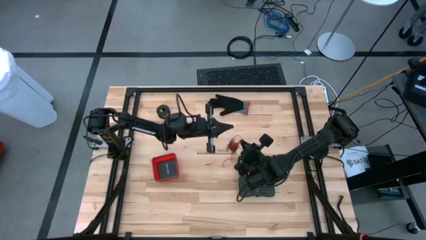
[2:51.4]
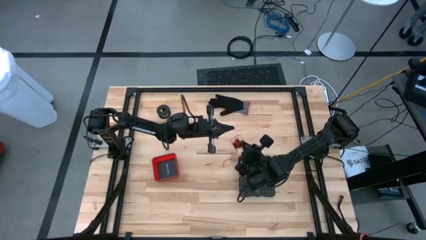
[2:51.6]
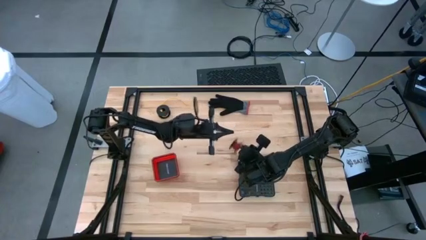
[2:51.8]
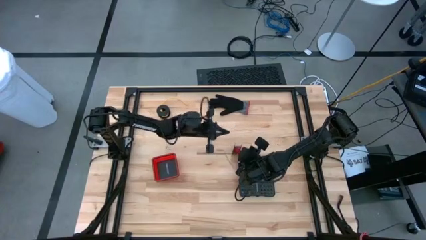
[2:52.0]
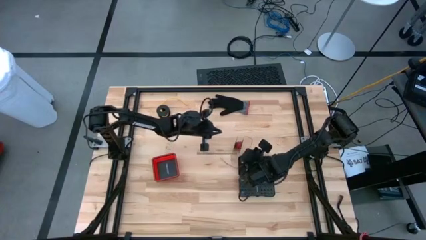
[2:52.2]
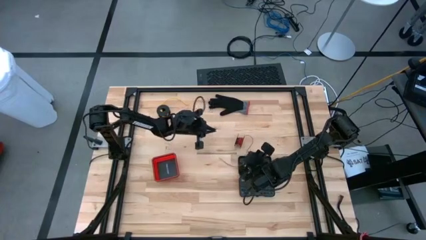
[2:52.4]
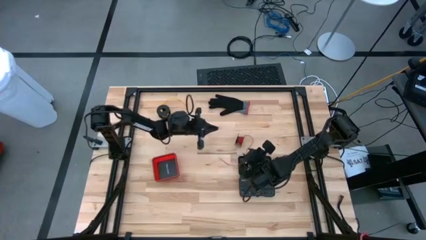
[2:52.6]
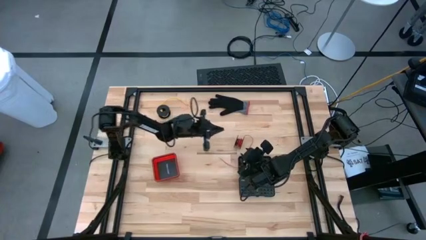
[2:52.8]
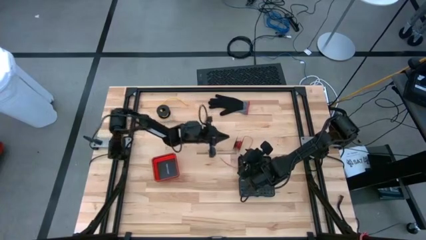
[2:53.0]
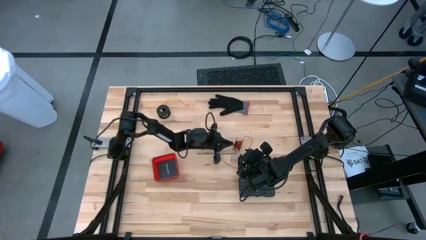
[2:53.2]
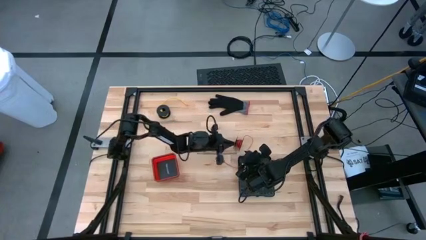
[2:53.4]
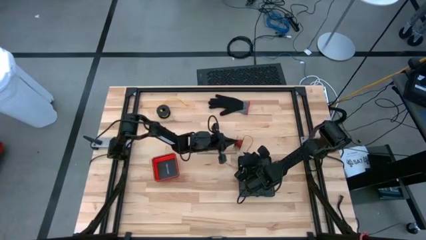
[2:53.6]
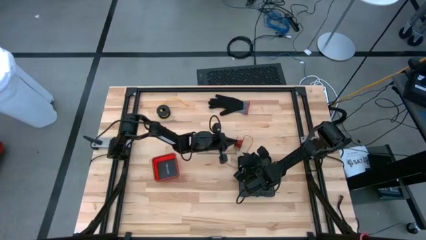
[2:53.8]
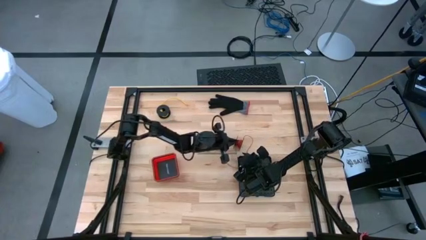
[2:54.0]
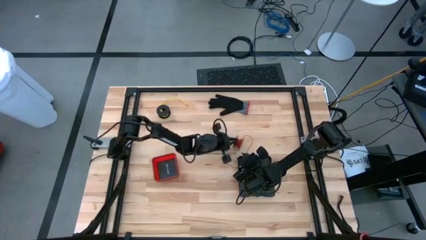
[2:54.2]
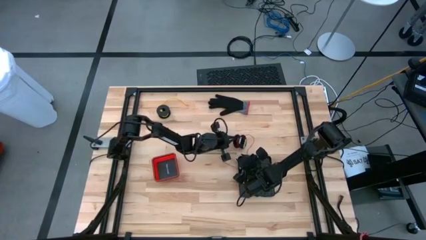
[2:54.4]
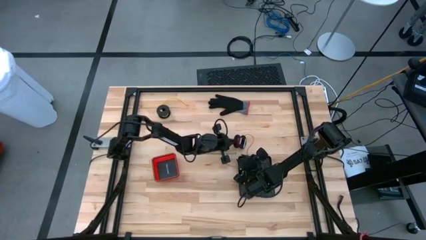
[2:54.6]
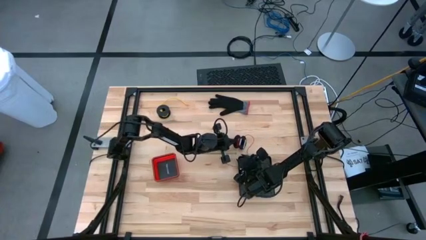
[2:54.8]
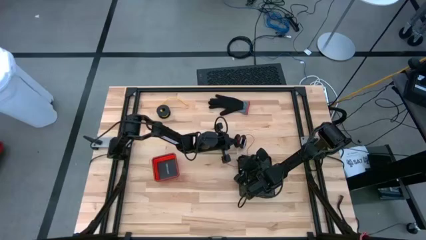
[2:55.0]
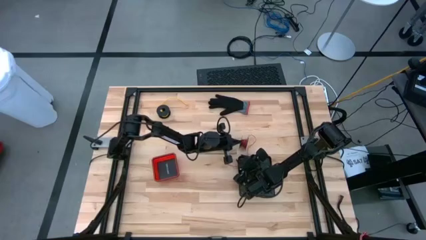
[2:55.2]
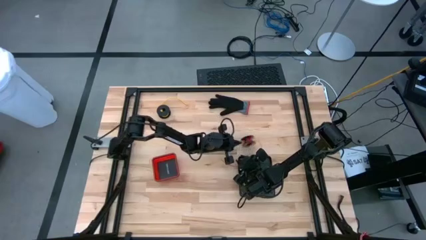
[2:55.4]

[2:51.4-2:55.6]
Task: Coil cords
Coil the red wire onto the spool

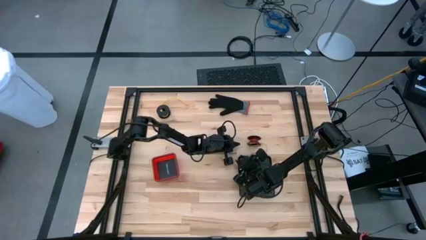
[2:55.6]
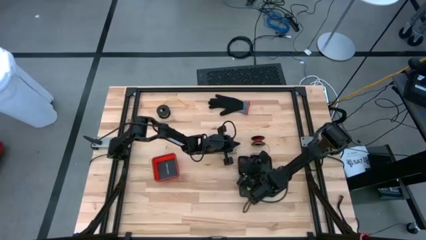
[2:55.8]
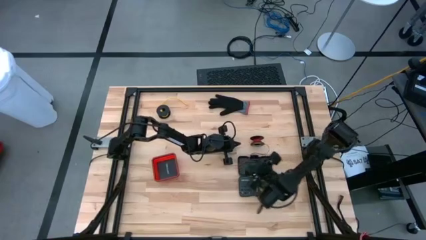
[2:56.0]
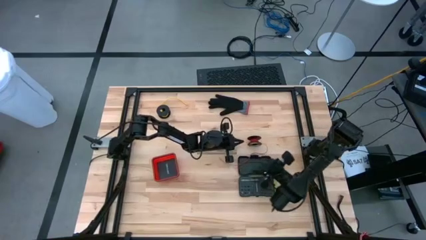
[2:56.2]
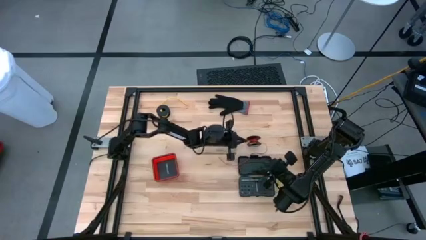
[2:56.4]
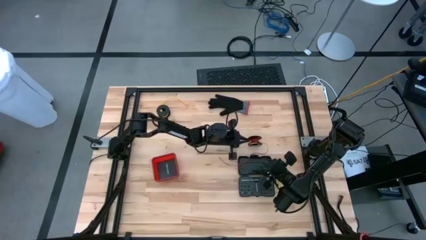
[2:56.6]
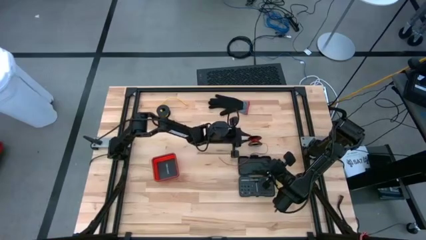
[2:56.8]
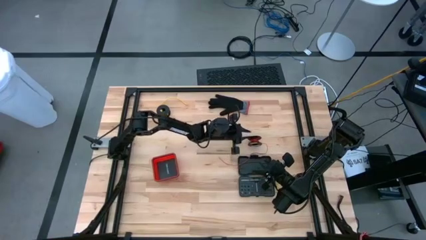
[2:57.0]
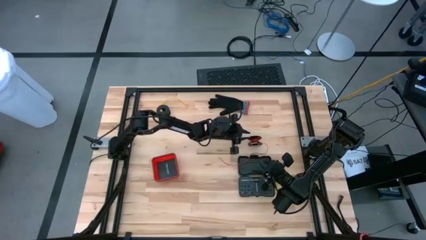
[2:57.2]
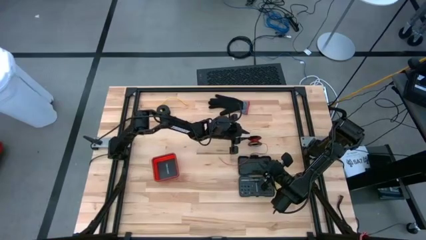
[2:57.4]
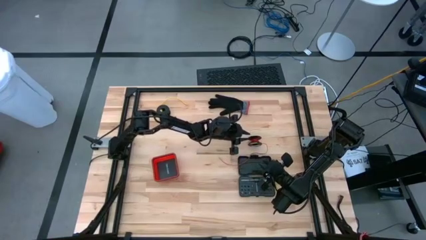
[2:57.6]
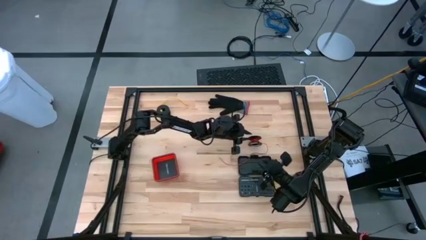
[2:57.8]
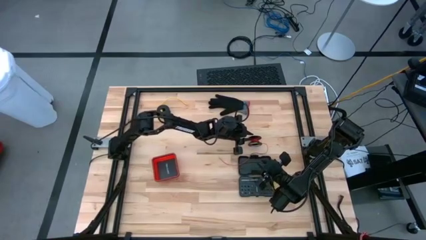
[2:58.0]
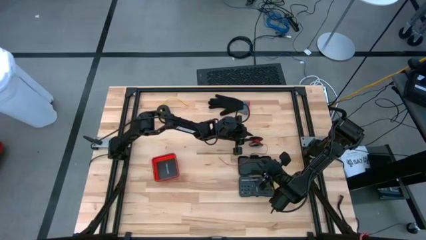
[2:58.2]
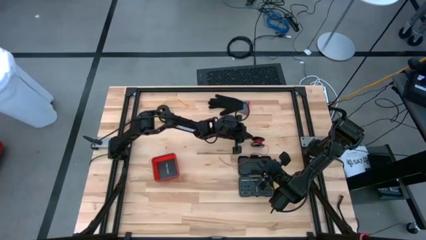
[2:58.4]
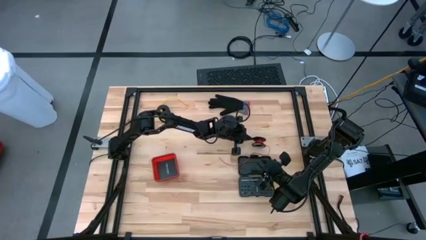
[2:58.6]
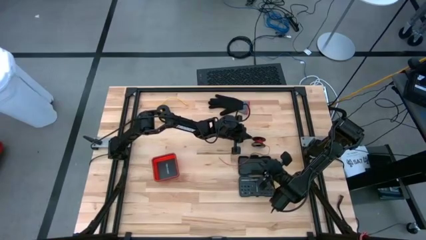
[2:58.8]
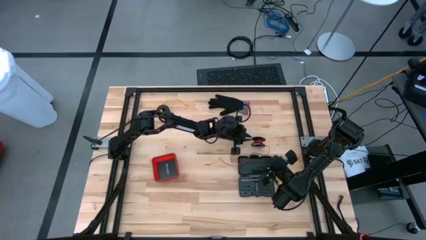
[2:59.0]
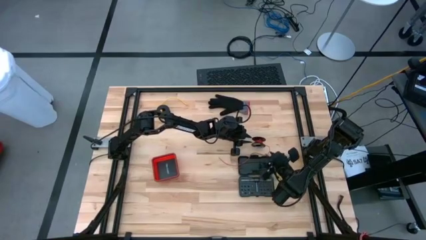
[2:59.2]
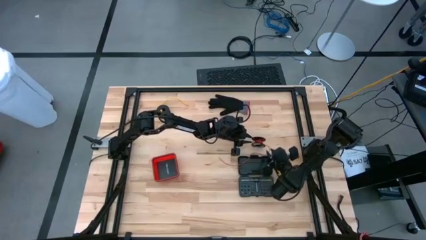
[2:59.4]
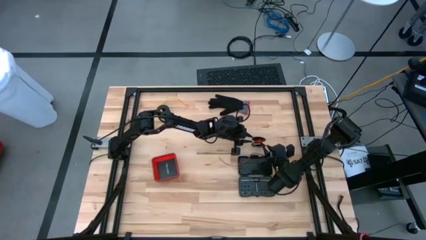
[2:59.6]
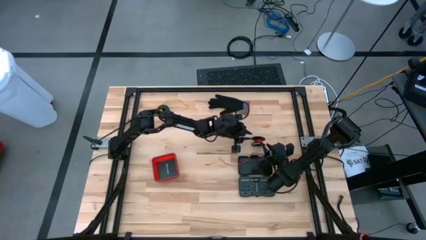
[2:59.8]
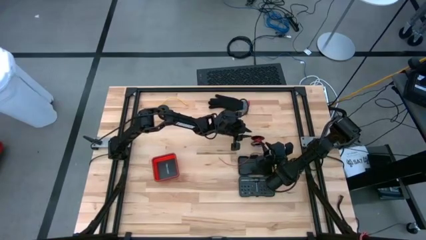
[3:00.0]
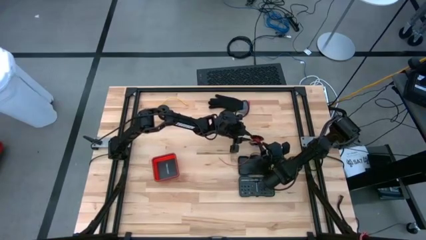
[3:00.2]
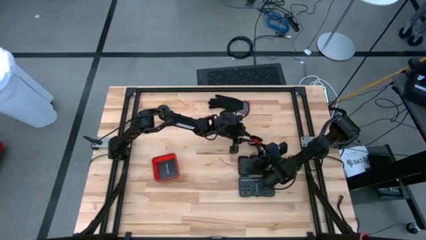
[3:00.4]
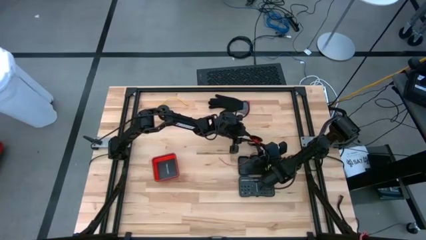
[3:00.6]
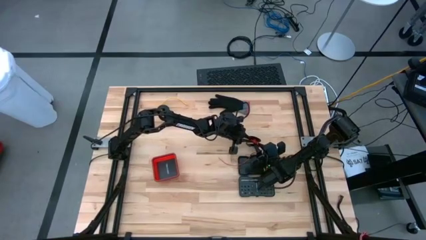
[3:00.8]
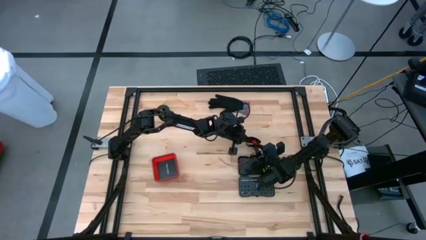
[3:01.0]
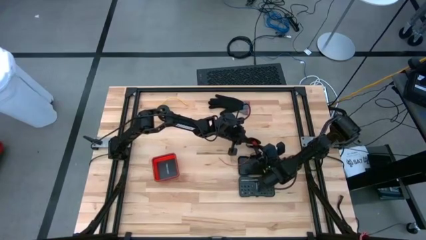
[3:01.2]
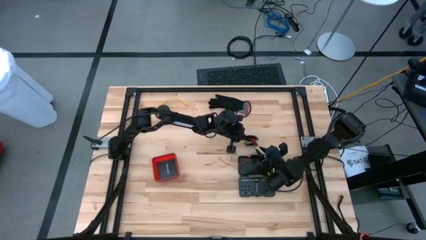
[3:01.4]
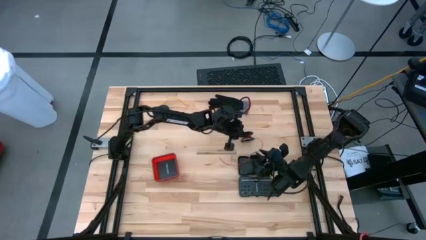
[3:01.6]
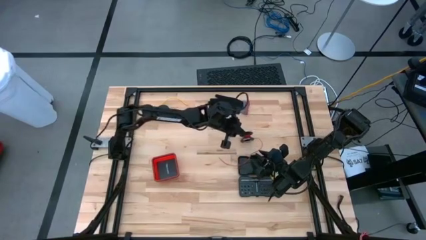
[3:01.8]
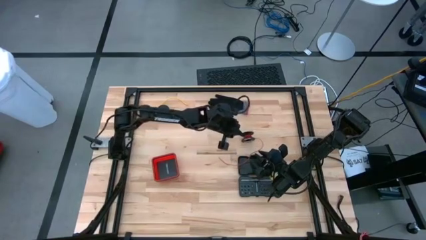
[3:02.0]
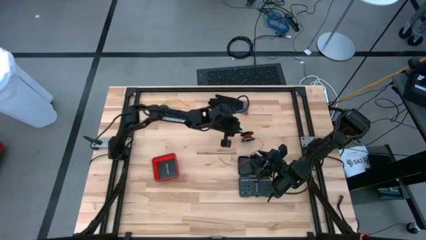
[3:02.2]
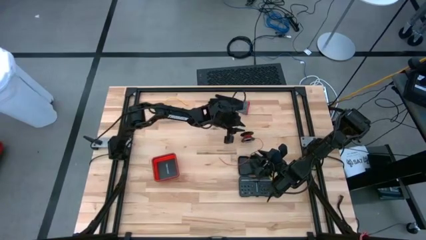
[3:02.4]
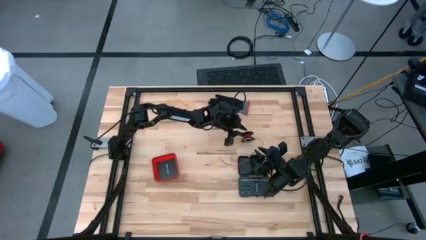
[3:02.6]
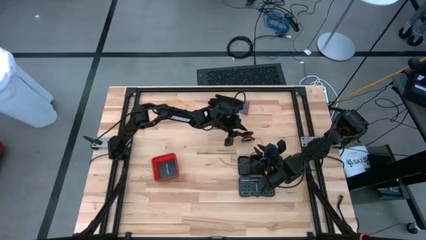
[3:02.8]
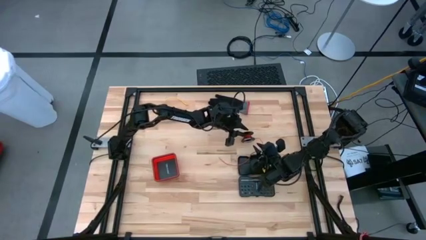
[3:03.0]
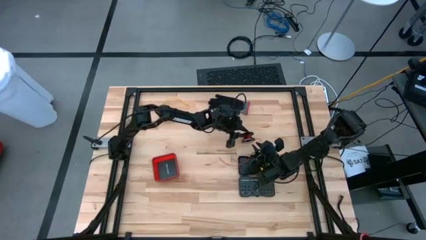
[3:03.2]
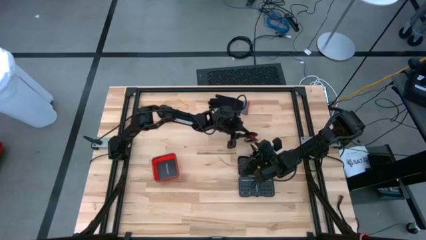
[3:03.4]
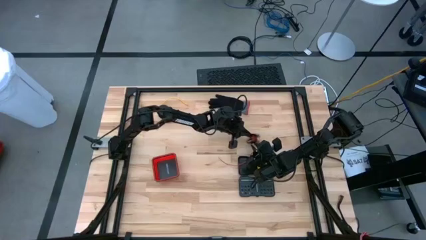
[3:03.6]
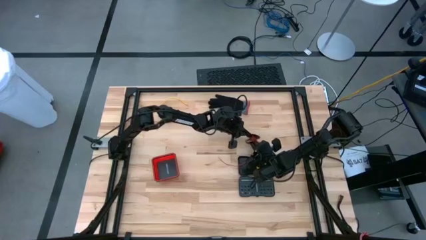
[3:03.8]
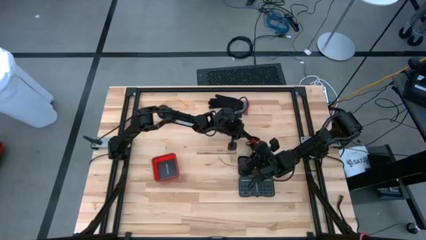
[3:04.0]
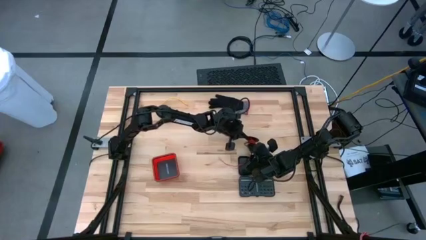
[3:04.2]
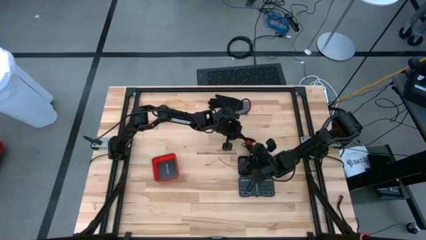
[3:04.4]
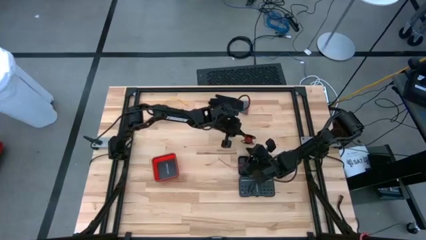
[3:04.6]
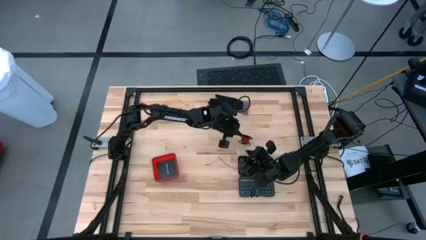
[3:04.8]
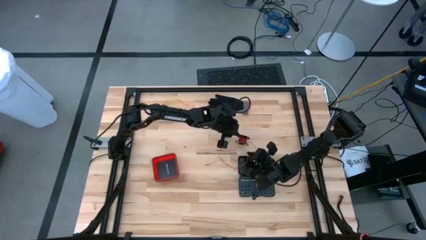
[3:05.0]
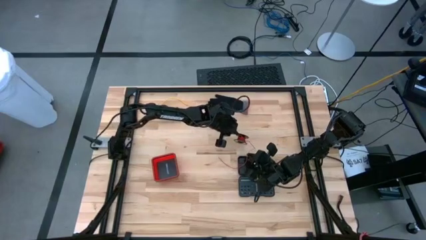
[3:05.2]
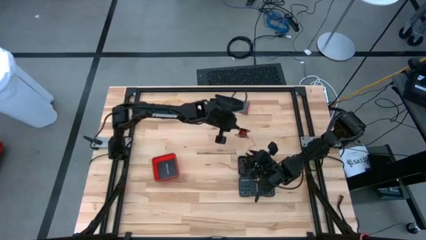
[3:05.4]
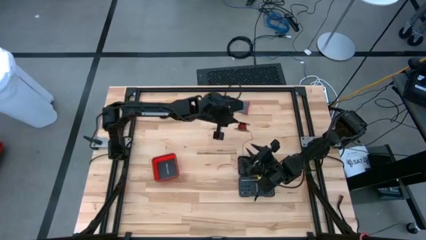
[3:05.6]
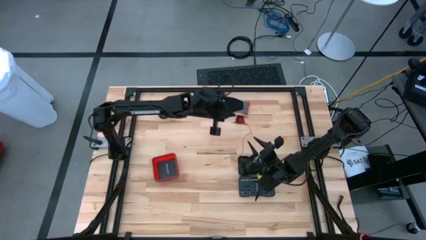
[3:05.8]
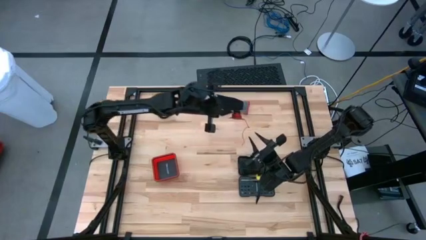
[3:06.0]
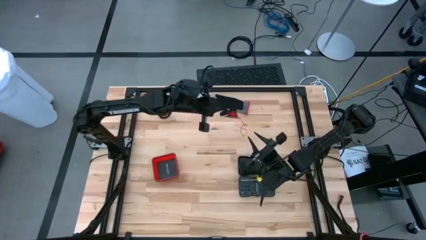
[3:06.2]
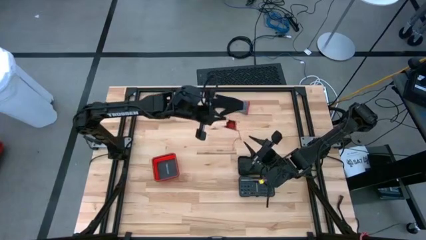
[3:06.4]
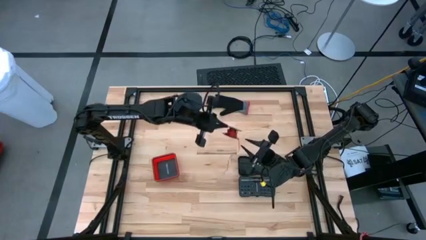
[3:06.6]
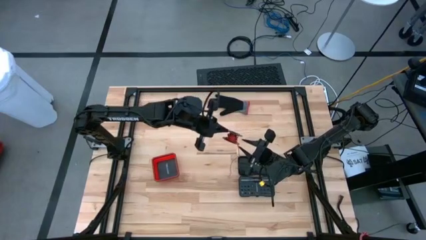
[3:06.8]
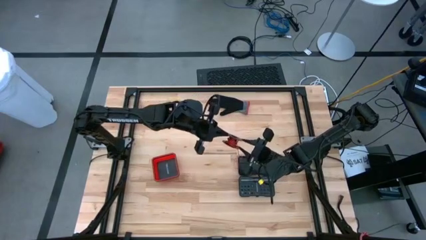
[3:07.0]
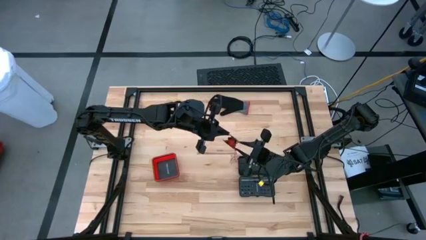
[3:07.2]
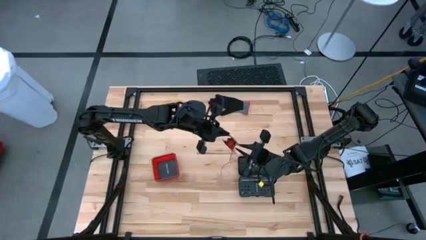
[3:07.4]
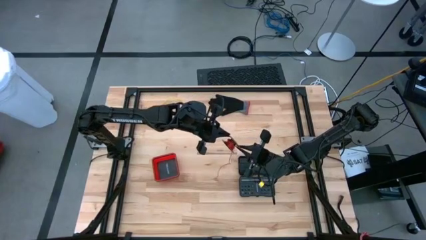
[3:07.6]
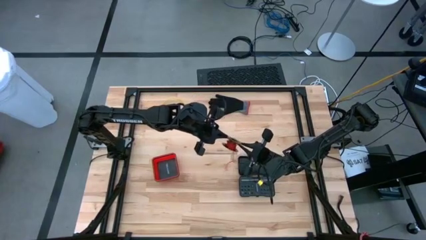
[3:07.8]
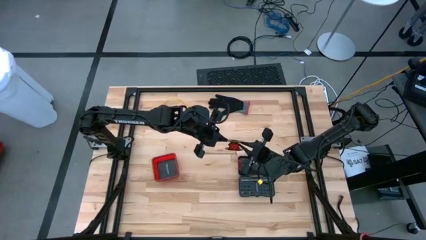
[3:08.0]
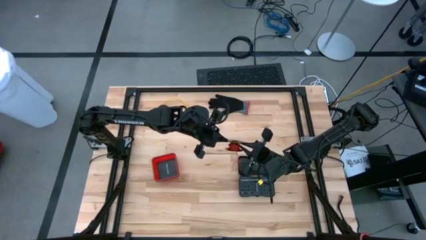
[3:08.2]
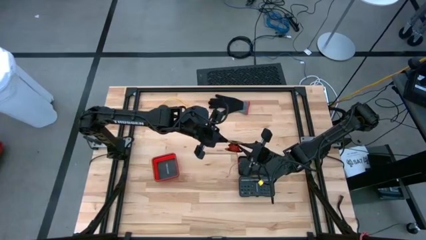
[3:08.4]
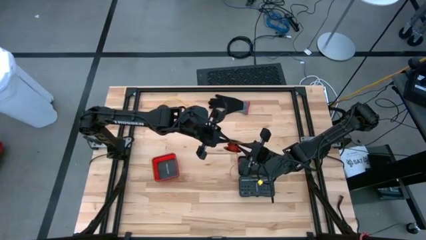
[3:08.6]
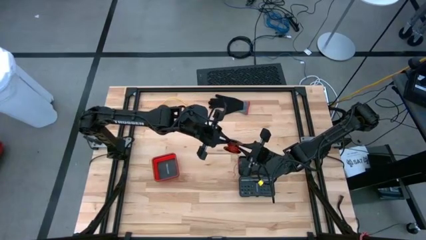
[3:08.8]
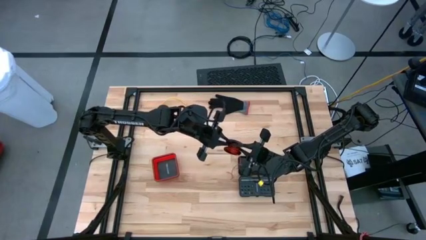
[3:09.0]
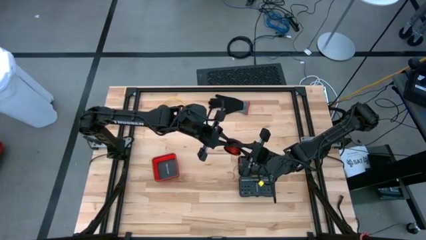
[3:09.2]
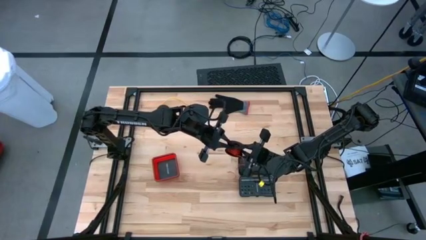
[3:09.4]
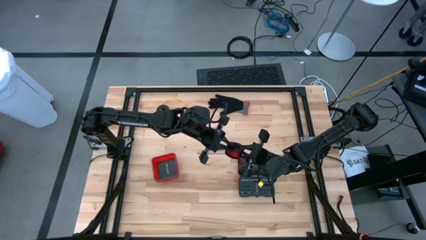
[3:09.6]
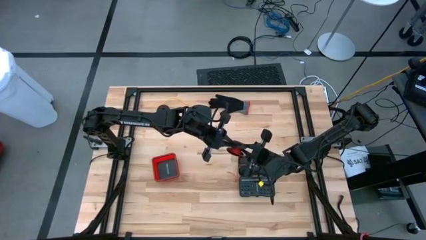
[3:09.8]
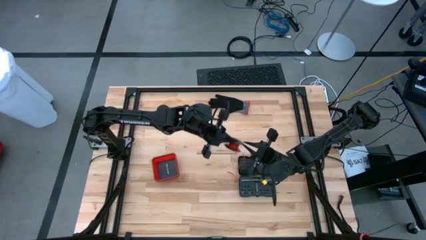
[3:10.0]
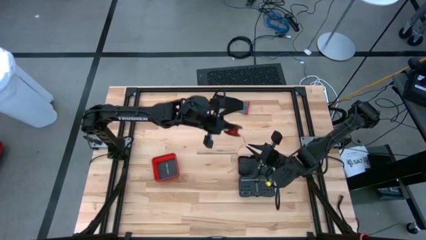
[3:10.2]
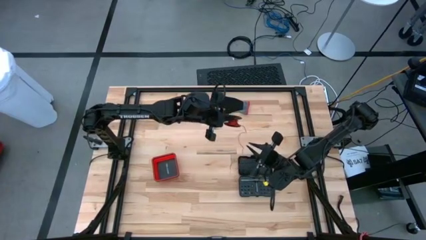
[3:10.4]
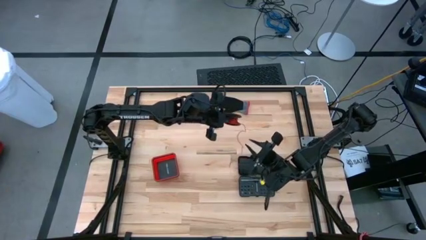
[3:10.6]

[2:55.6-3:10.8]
Coil the red wire onto the spool
